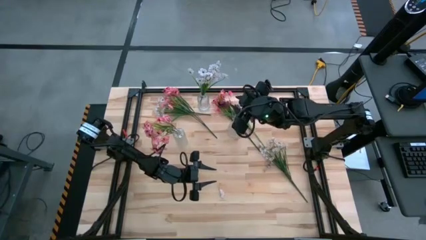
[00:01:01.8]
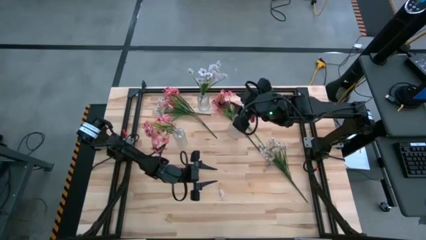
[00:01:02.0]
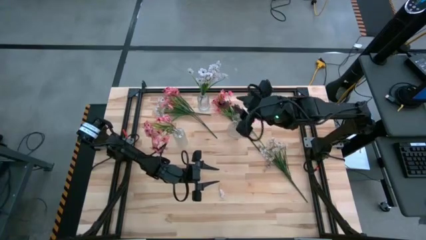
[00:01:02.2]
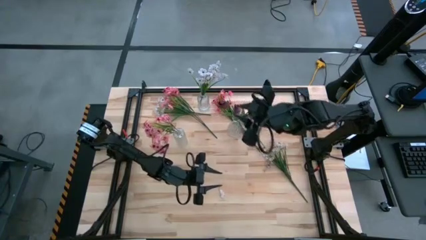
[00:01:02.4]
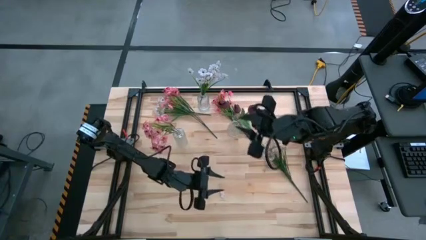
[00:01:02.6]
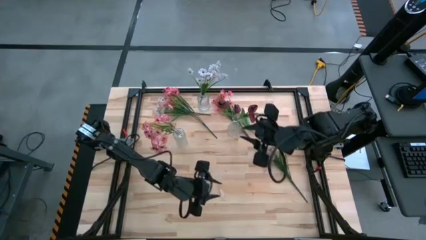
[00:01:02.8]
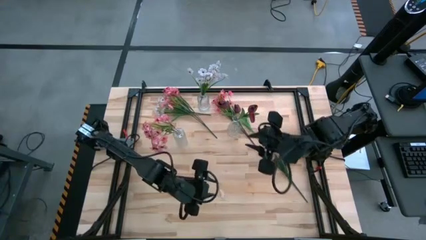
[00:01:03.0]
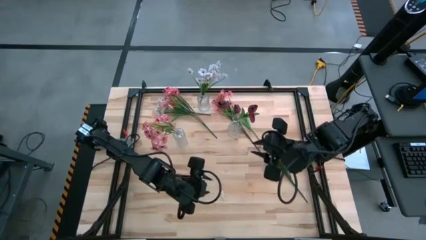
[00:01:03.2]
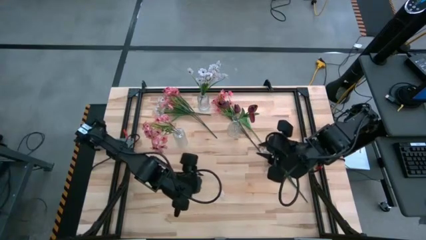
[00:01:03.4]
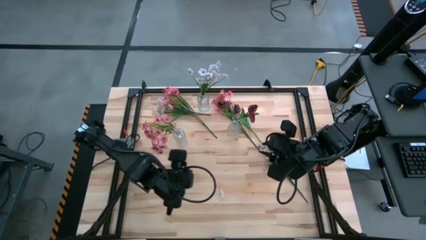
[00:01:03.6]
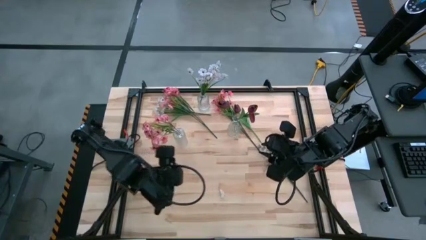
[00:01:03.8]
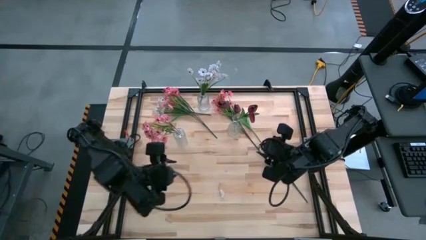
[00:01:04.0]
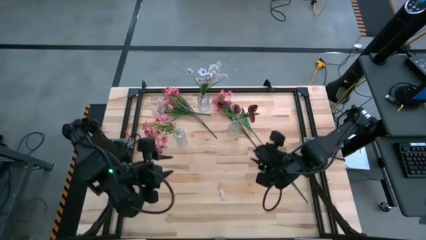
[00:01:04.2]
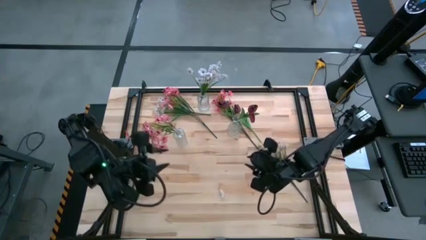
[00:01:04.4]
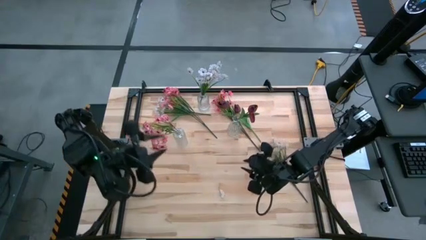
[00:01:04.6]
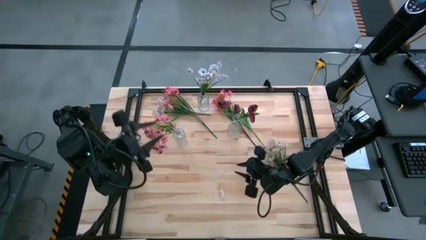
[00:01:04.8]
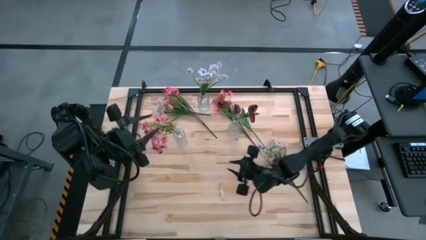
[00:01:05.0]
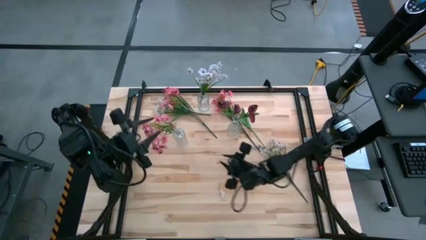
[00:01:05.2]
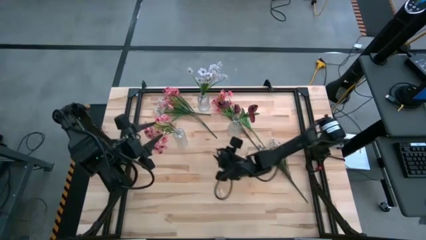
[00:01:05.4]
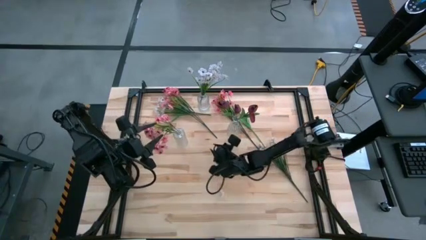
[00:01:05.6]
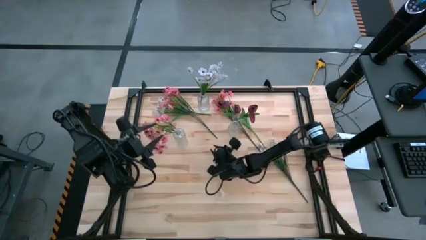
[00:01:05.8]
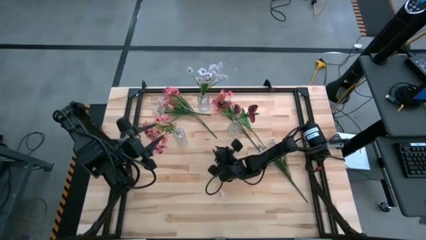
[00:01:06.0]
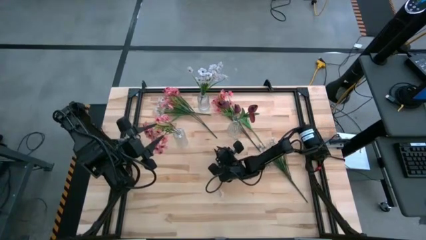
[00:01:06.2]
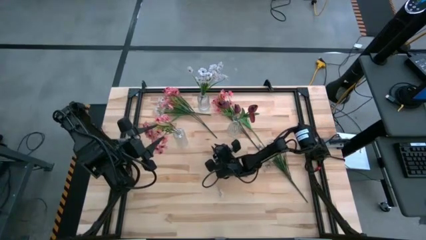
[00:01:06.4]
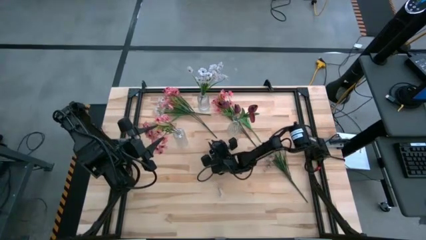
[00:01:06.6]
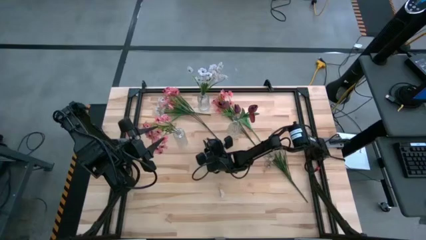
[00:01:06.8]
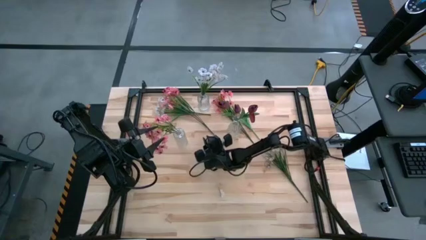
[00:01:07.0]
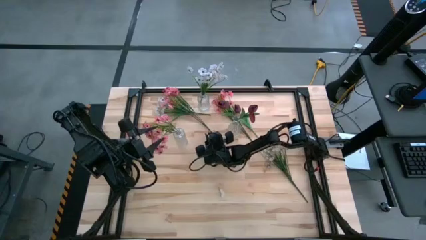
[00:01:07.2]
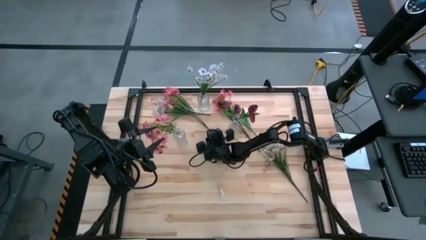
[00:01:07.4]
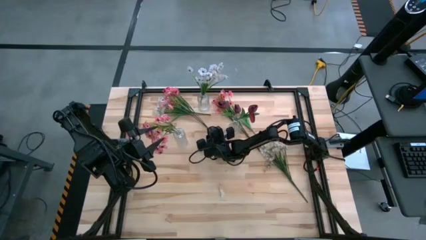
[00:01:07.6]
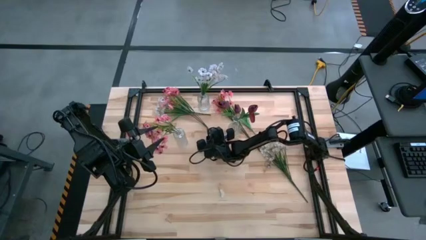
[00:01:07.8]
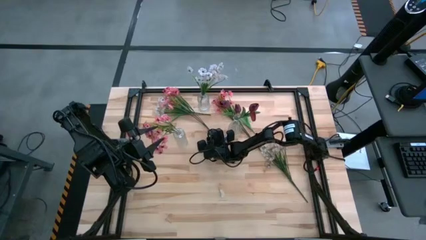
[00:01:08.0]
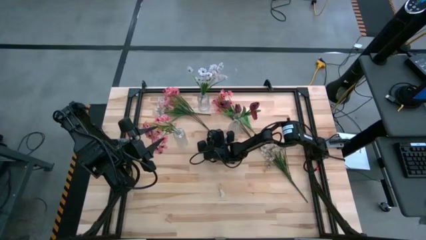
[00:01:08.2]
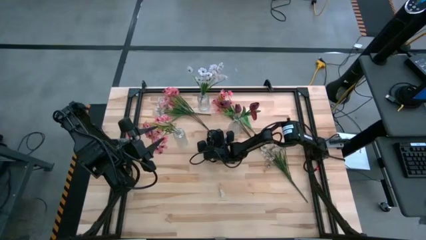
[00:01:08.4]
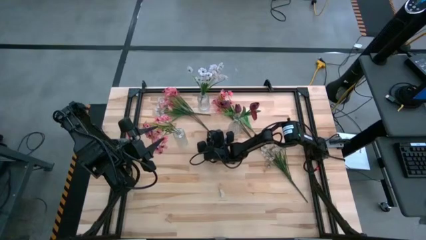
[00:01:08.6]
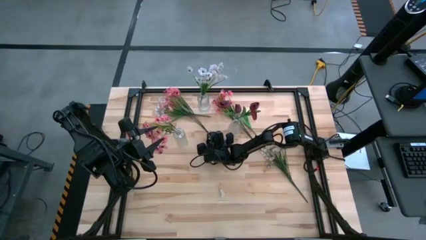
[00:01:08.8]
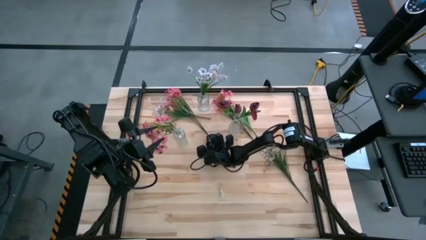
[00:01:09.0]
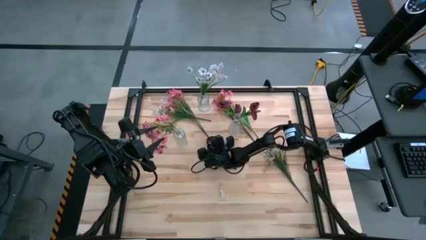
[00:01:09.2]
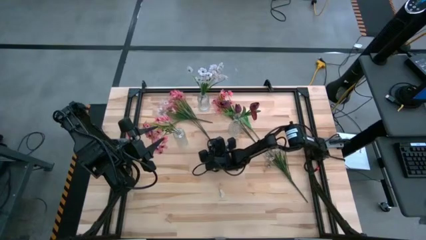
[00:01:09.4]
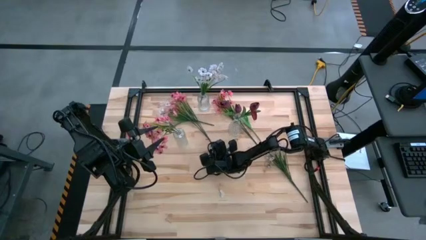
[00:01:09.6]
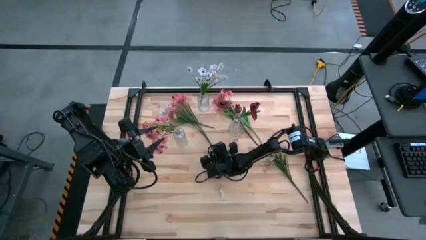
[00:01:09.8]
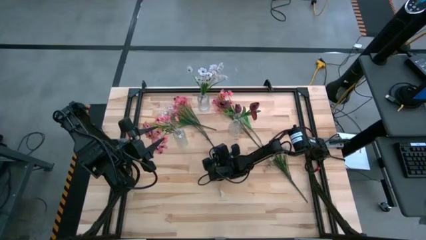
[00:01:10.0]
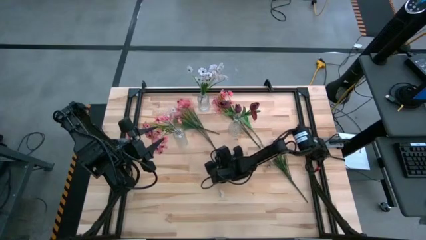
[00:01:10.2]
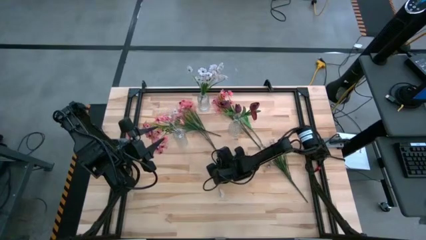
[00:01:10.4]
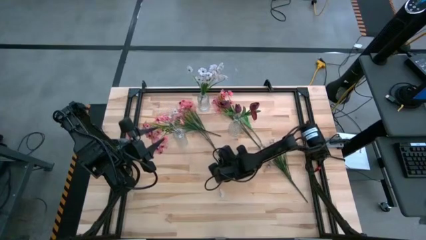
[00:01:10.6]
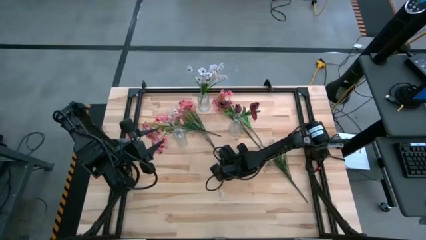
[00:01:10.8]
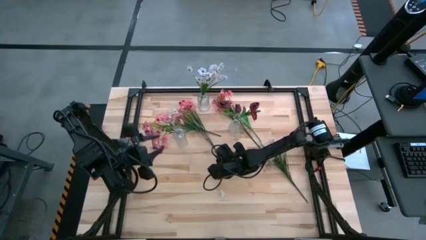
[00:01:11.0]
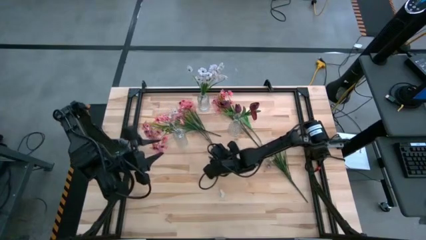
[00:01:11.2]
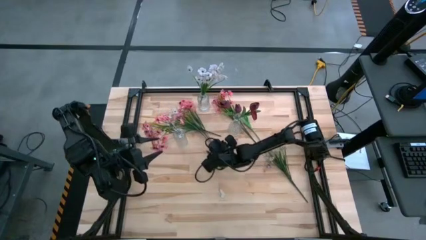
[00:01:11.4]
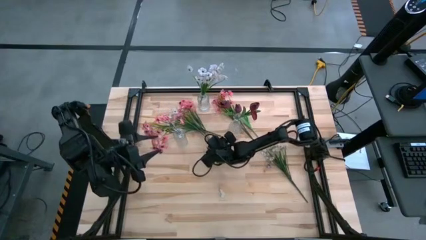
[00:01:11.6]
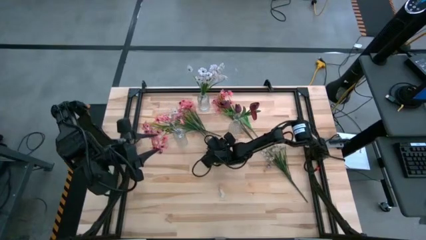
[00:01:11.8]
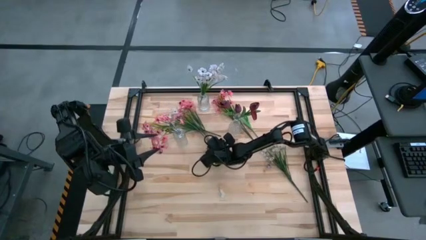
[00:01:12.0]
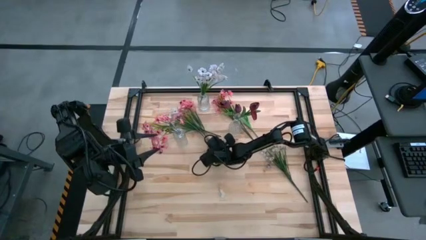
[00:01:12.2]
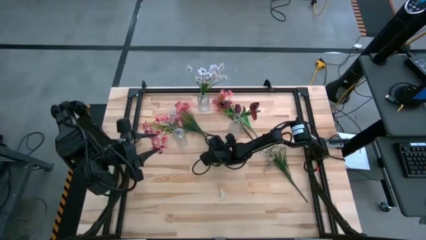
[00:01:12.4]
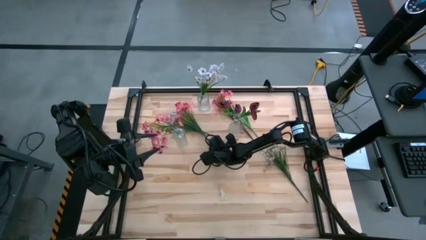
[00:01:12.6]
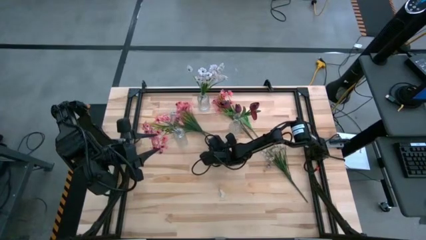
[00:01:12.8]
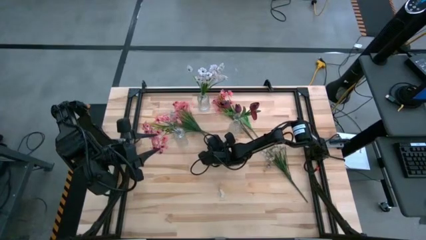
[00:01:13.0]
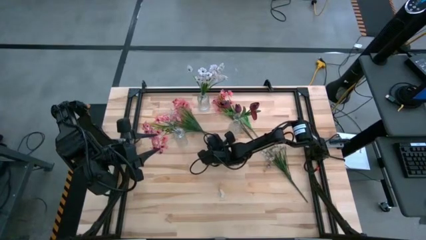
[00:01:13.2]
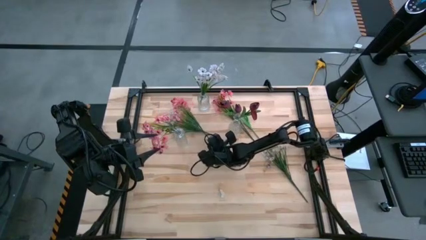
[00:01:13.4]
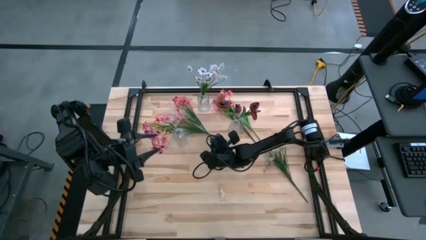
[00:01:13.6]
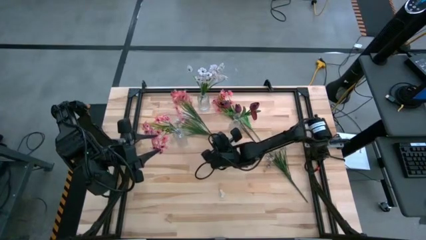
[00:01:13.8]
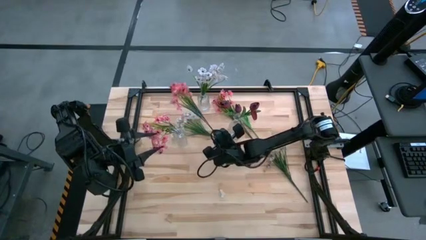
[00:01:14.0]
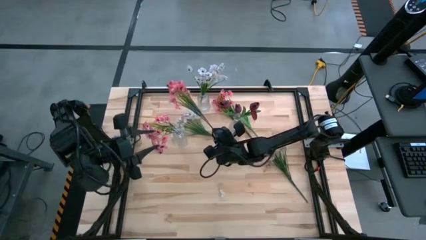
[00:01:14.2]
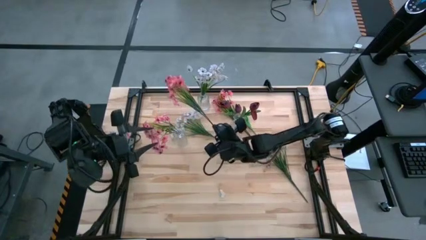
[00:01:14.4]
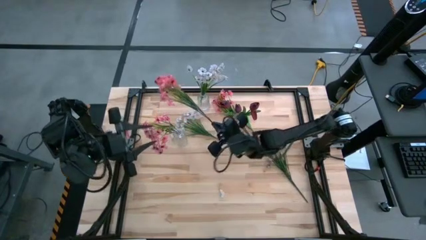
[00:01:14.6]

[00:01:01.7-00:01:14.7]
Task: Sort flowers into vase by color
Put the left pink flower into the bottom left transparent vase
